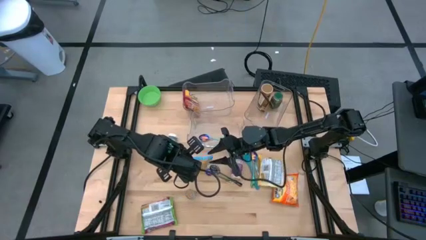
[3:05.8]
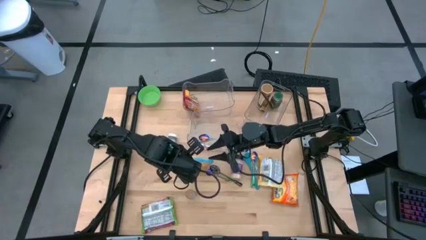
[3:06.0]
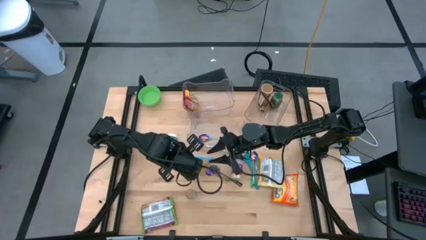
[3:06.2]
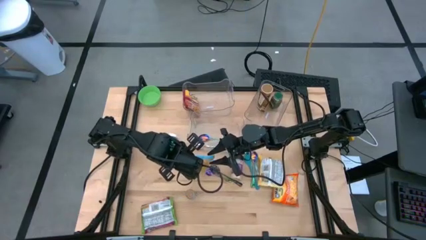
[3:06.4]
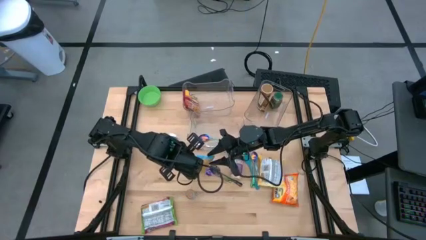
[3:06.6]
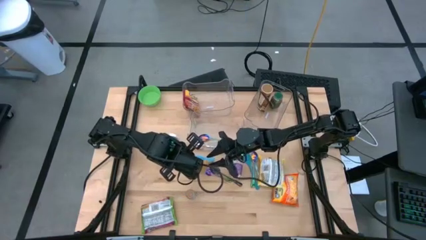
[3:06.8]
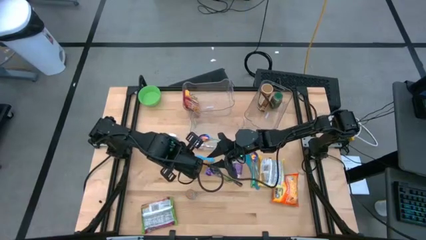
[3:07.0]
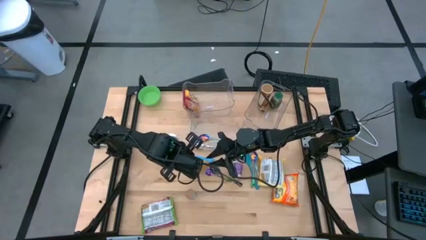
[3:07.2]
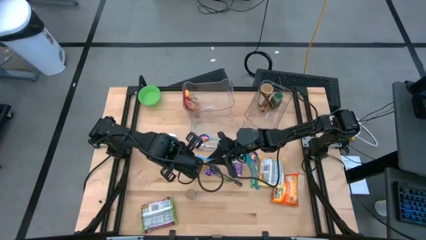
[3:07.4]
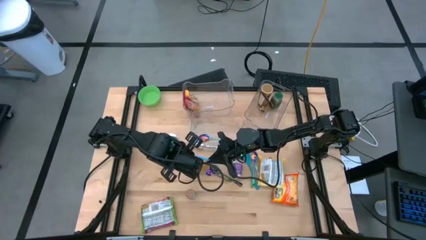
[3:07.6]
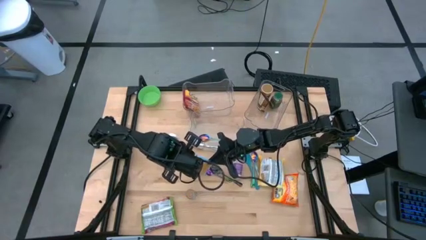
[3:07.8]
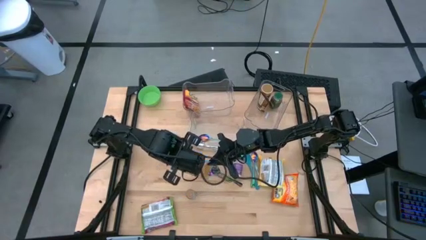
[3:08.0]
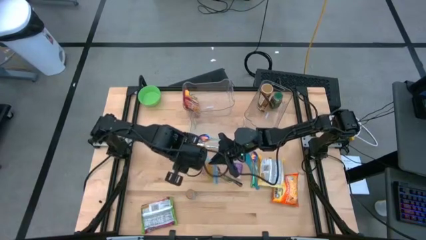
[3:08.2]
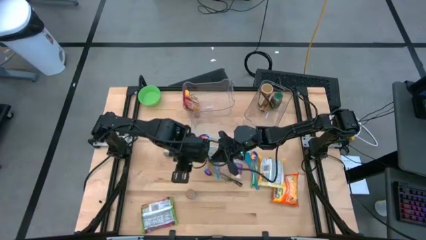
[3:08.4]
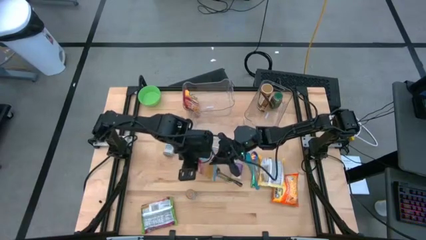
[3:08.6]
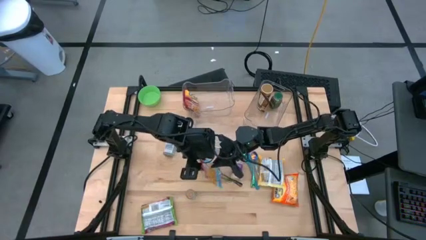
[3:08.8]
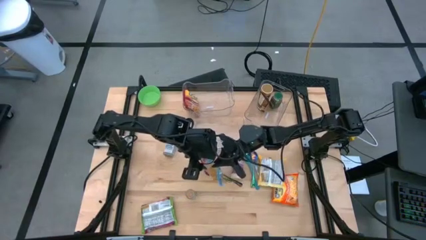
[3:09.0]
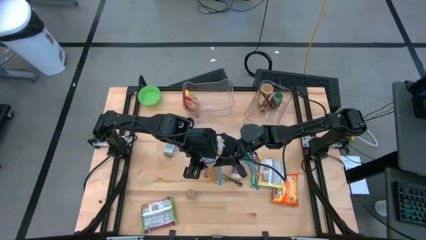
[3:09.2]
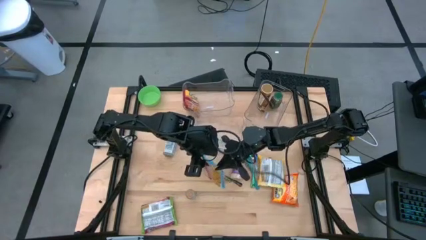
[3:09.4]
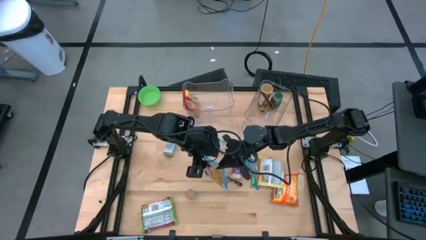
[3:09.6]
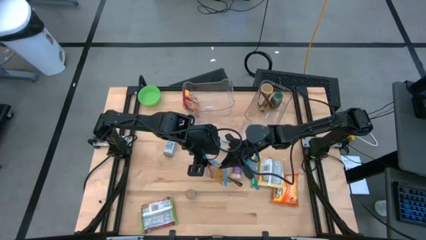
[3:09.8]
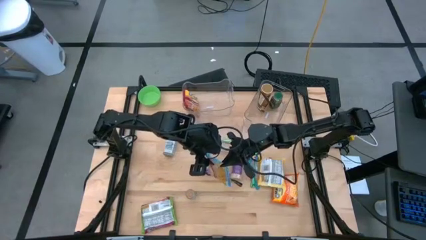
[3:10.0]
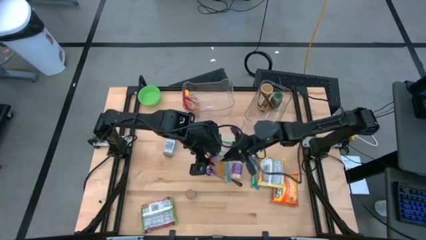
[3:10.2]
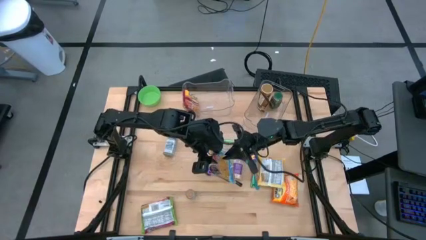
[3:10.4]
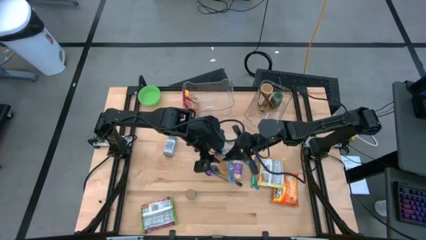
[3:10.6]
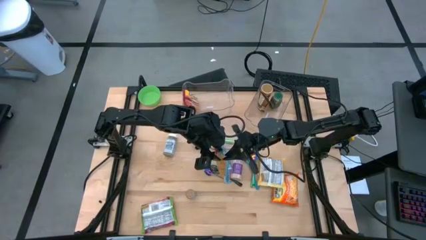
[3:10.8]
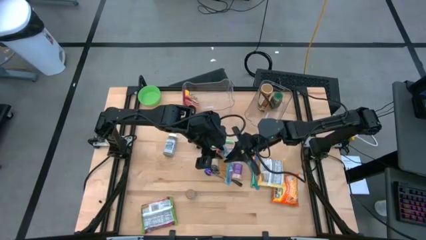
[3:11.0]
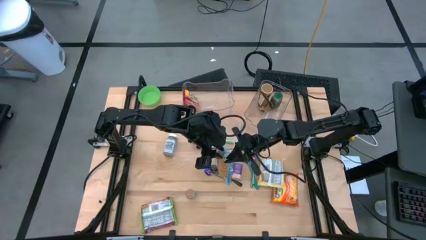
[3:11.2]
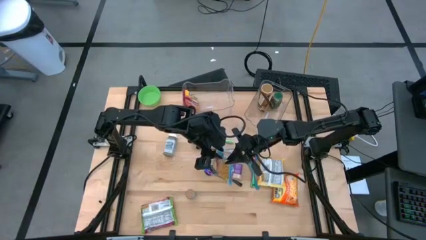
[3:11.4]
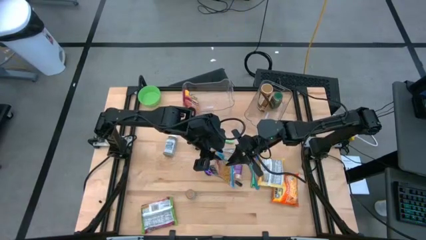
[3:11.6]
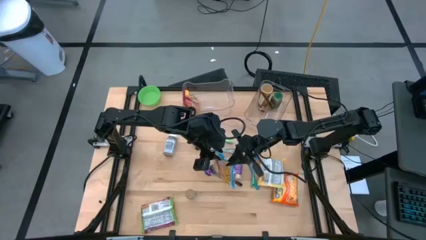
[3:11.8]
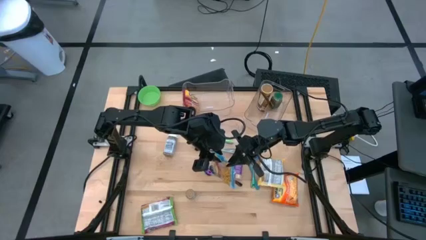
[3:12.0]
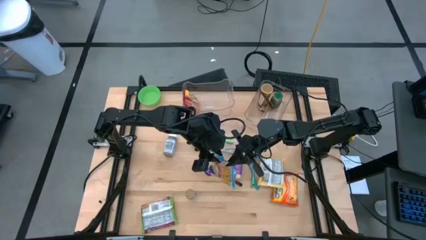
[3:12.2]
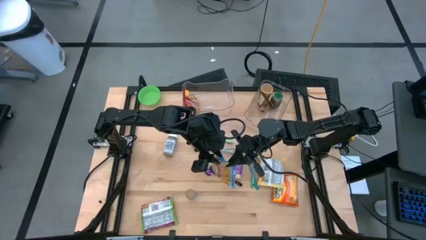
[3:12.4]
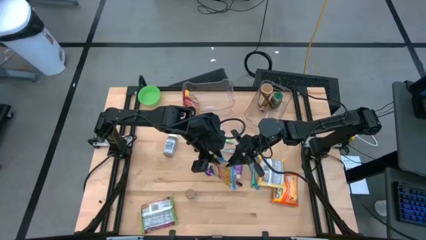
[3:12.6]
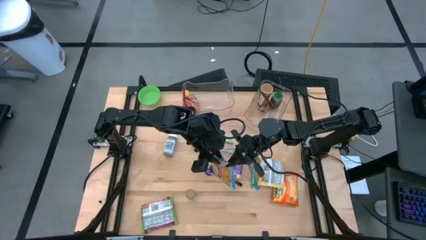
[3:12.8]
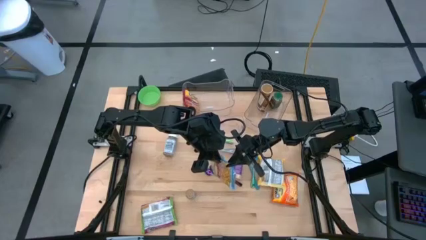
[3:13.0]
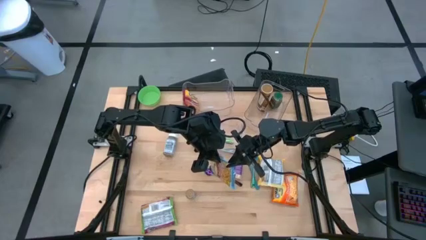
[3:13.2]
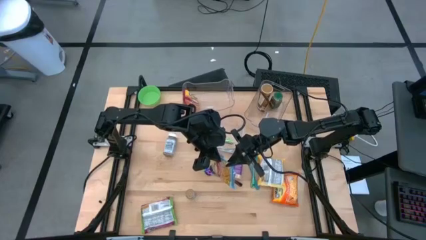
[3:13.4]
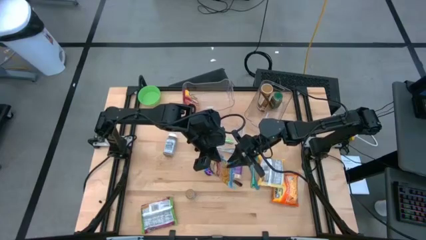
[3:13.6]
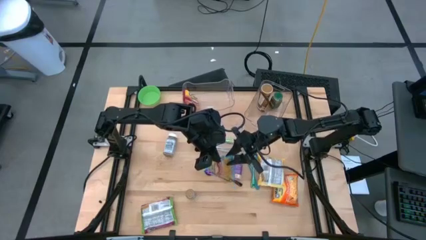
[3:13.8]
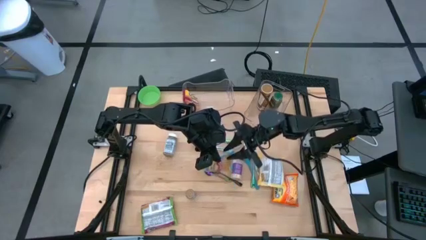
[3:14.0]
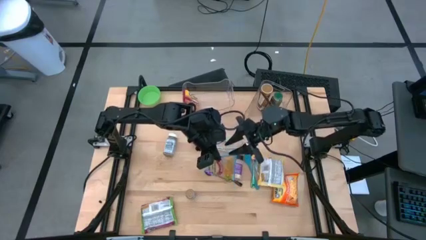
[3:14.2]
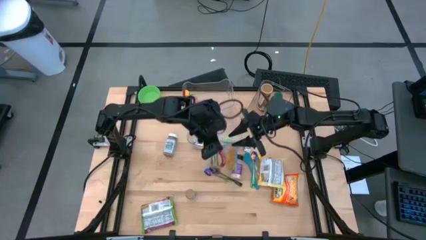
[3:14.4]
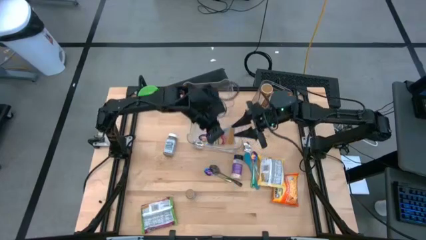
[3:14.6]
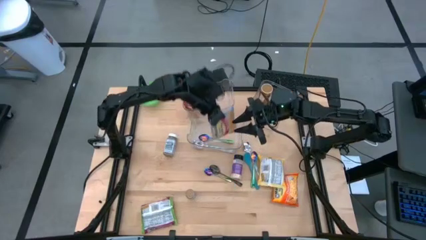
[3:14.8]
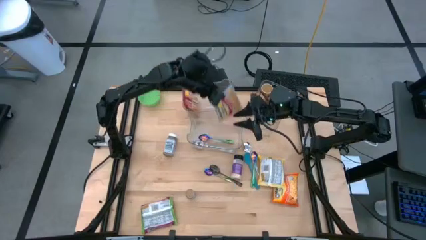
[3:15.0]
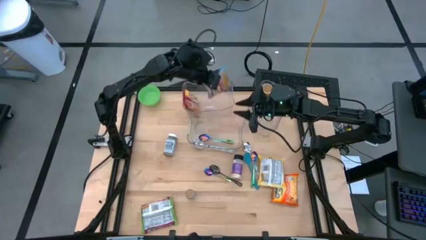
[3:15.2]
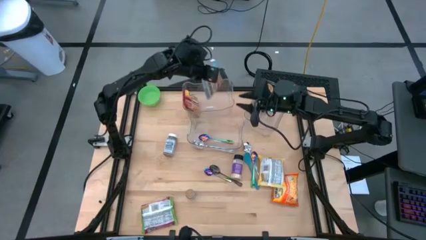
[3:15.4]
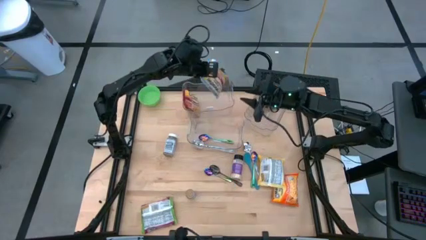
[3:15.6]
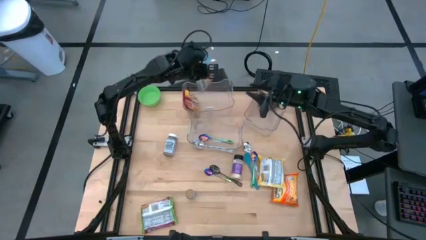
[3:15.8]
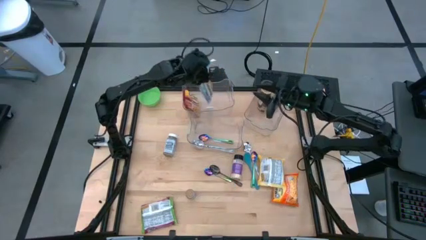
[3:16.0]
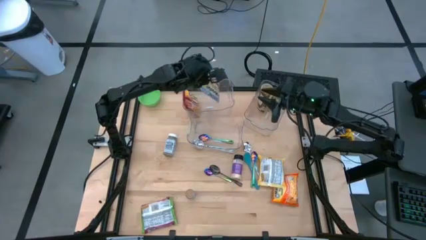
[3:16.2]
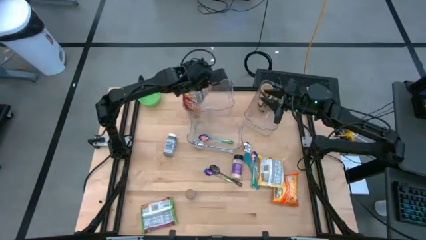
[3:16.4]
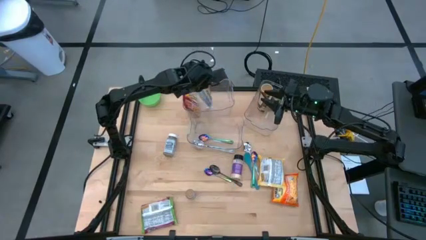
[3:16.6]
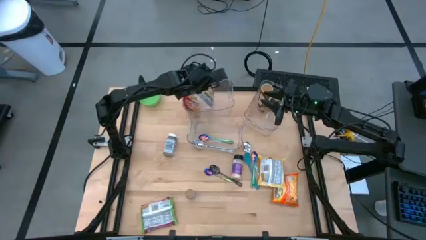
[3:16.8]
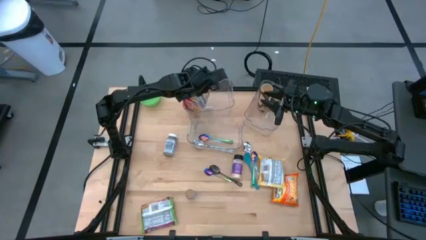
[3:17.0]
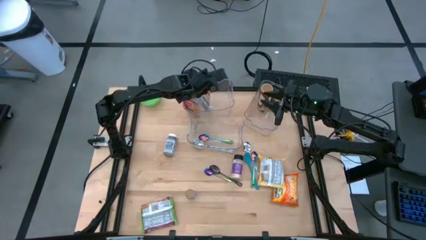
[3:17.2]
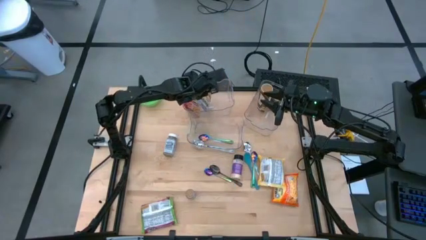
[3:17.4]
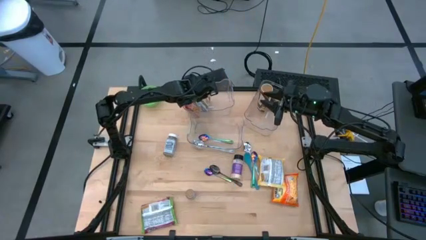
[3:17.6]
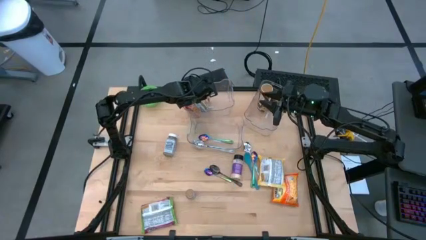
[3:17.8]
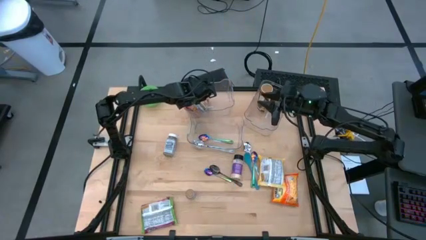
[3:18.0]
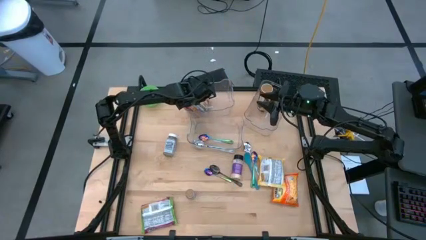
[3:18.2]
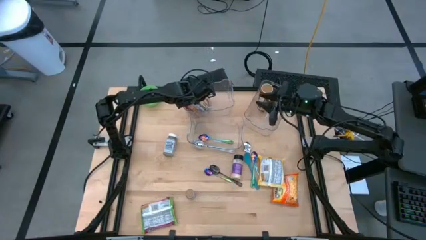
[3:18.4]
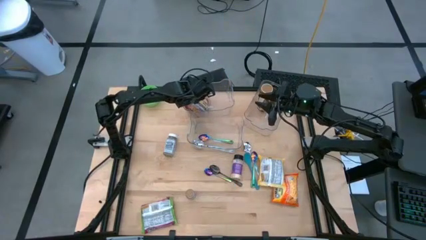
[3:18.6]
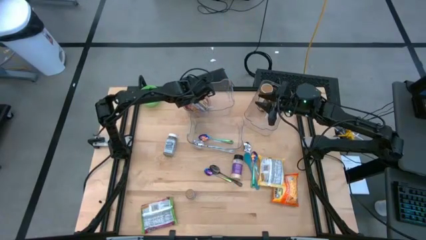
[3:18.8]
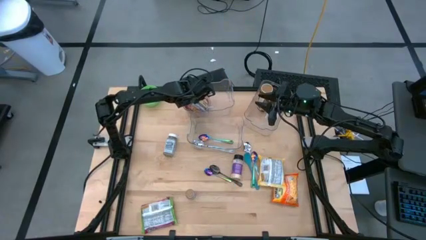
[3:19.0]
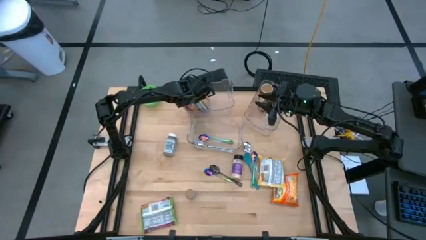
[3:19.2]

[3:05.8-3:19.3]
Task: Pick & Place Food Item
Put the blue noodle pack into the top left transparent bin
